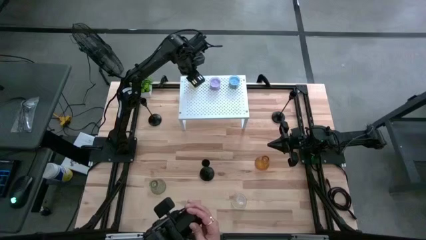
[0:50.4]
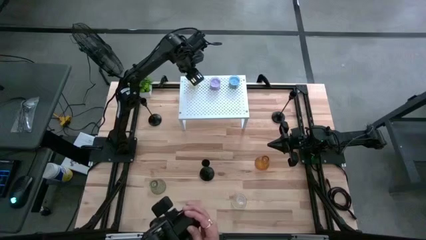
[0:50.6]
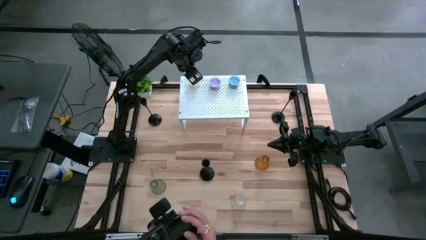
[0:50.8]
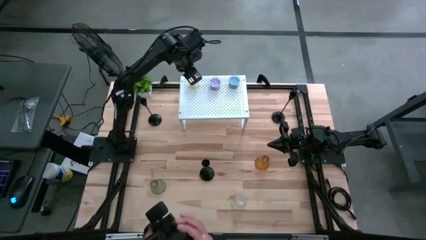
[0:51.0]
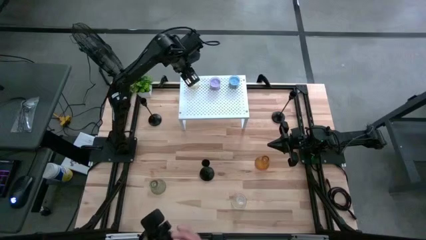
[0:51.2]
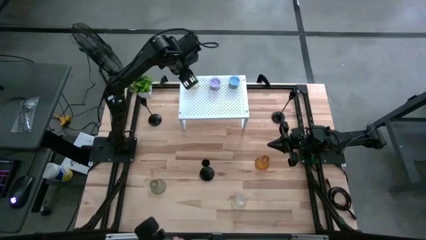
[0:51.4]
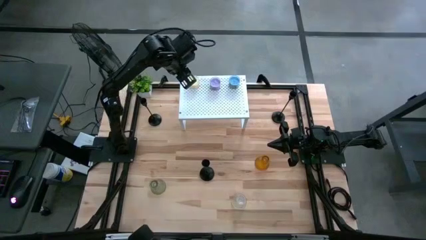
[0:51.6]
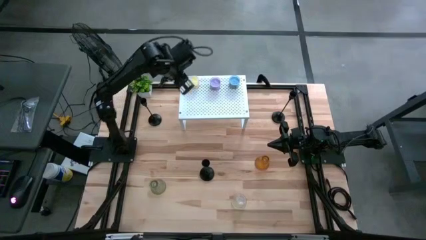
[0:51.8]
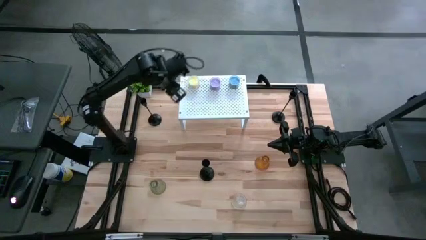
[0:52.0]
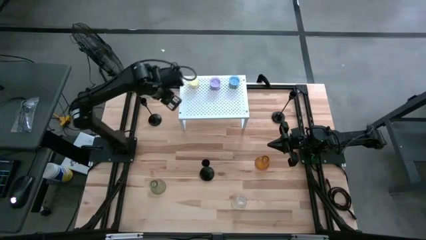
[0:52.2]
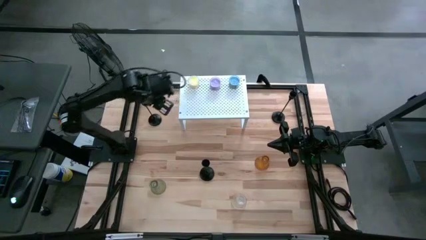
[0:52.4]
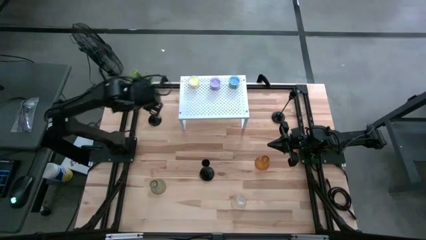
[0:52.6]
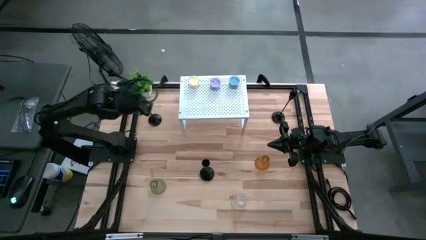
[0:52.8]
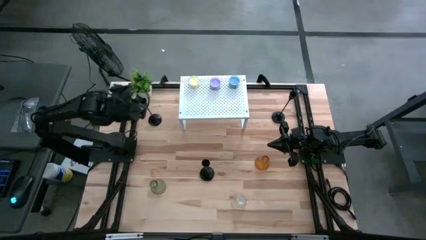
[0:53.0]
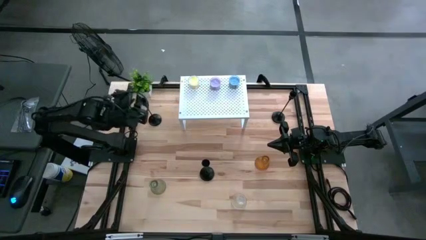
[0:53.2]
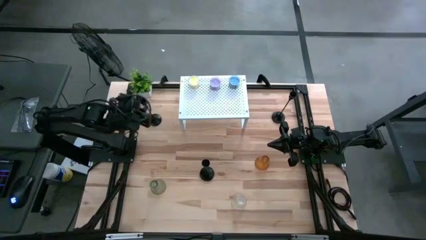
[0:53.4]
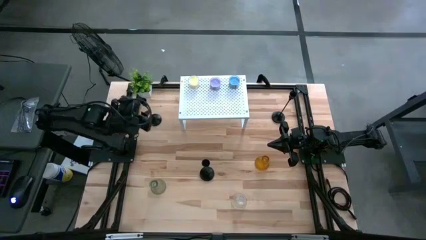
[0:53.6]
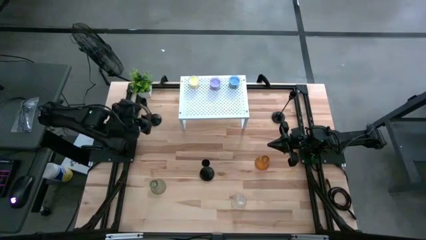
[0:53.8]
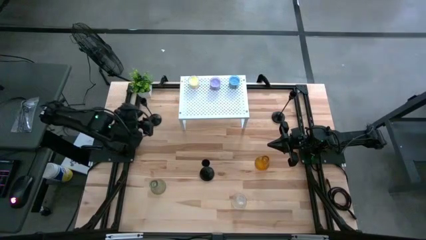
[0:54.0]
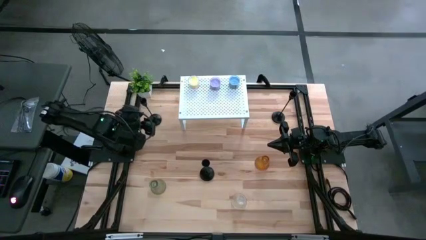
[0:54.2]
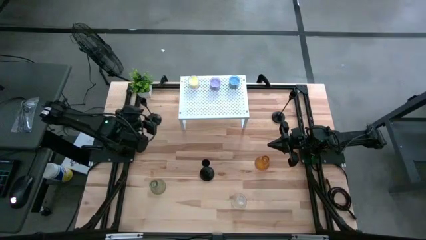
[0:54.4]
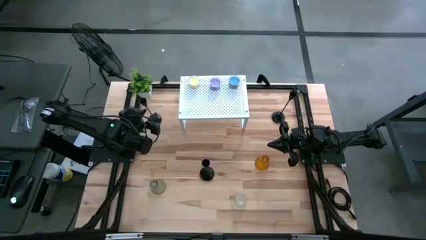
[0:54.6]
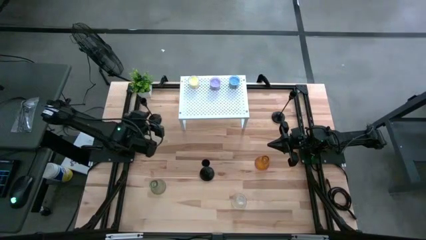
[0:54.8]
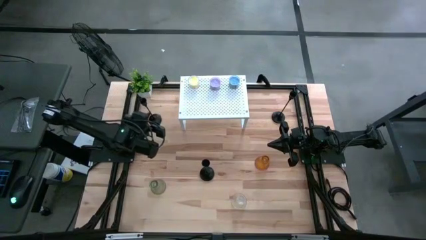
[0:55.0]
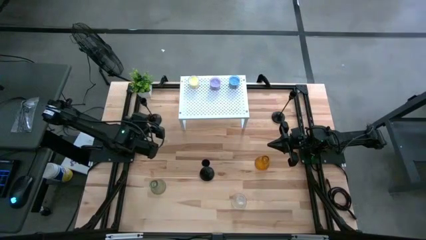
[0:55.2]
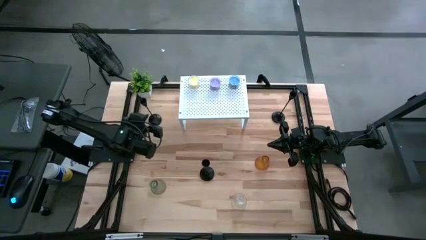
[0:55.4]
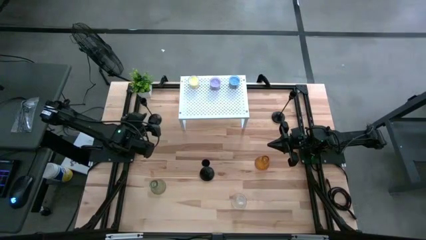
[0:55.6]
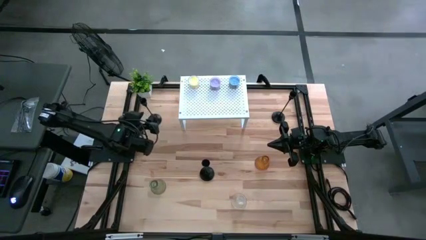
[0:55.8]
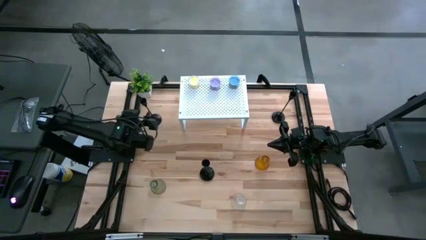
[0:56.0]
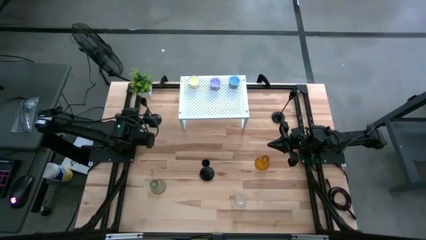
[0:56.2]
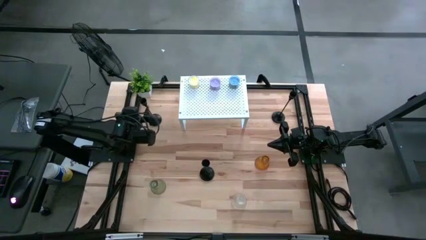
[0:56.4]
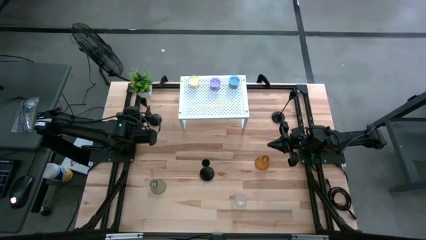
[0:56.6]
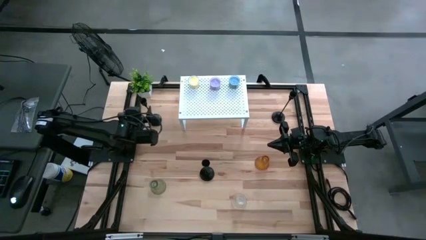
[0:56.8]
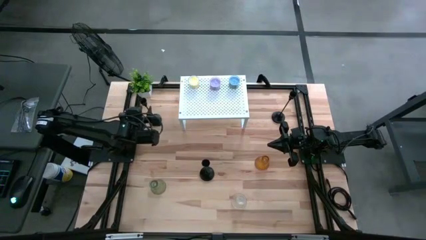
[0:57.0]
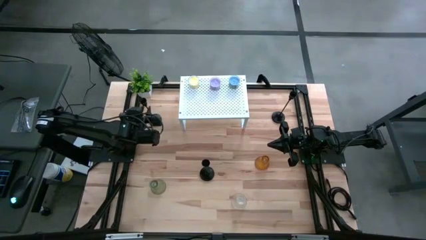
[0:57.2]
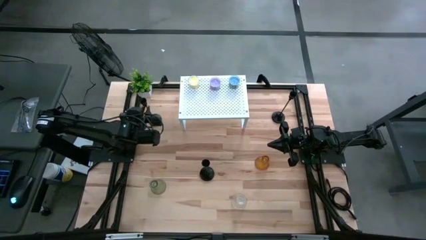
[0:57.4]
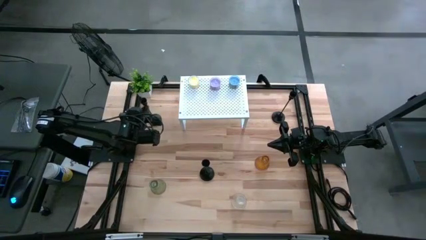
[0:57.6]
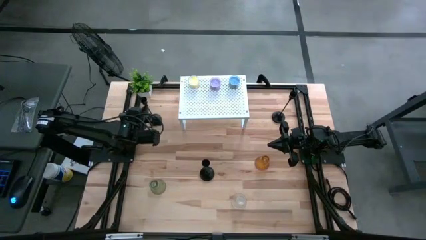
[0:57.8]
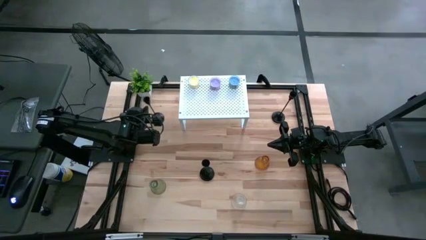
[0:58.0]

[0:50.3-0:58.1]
Task: Pick & Place candle stick holders
Put the top left black candle holder on the shelf

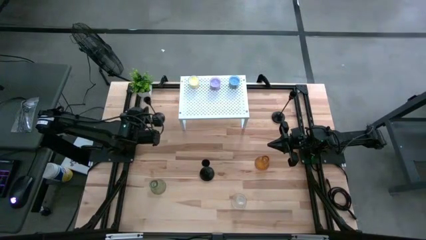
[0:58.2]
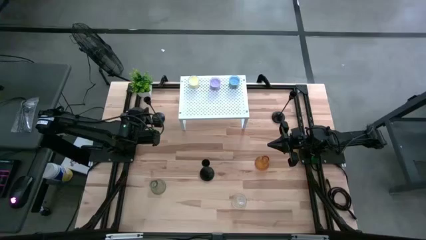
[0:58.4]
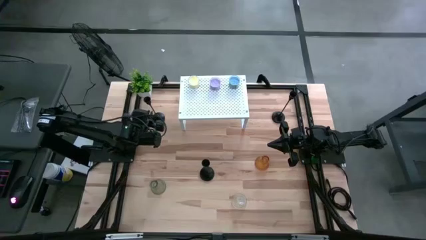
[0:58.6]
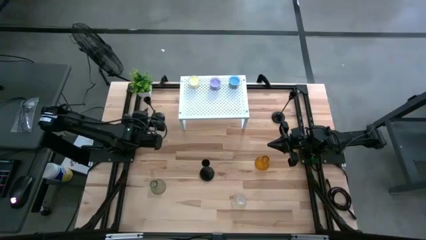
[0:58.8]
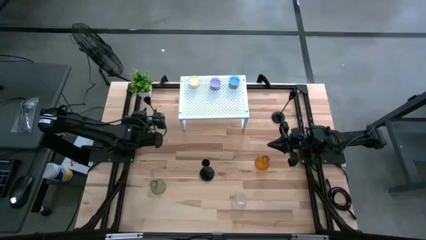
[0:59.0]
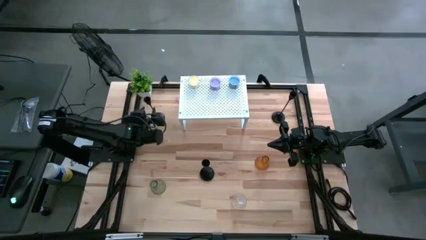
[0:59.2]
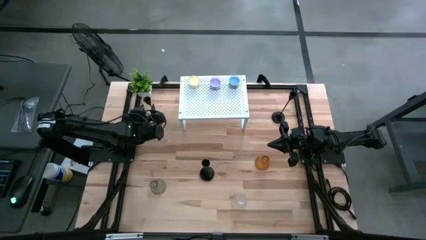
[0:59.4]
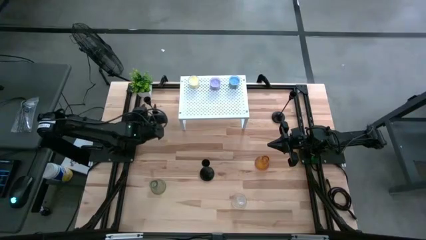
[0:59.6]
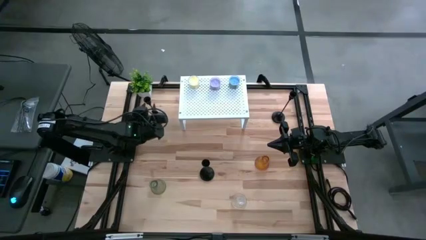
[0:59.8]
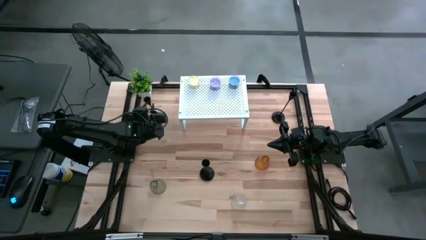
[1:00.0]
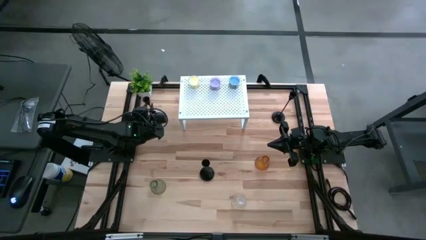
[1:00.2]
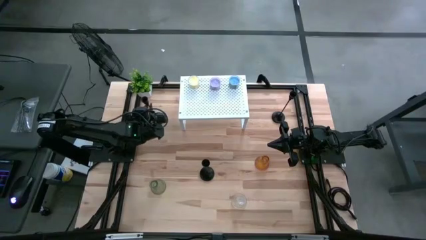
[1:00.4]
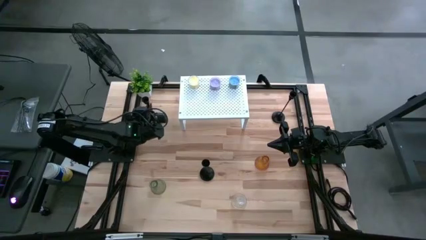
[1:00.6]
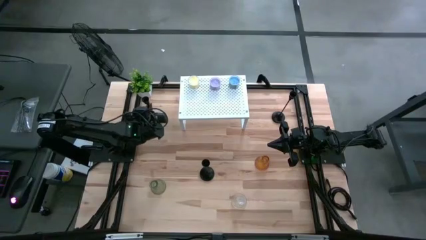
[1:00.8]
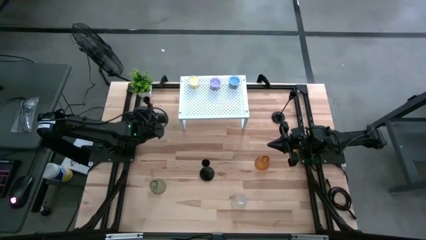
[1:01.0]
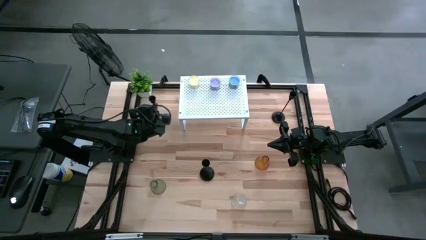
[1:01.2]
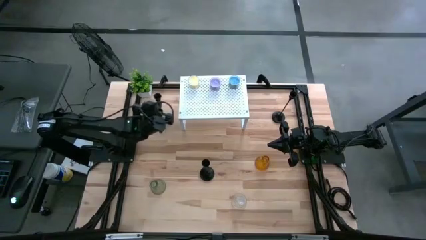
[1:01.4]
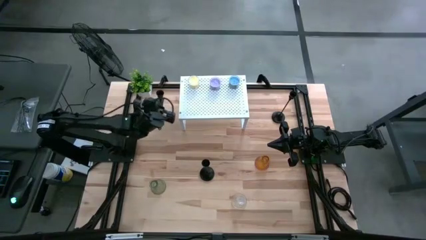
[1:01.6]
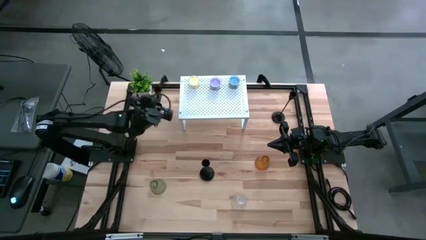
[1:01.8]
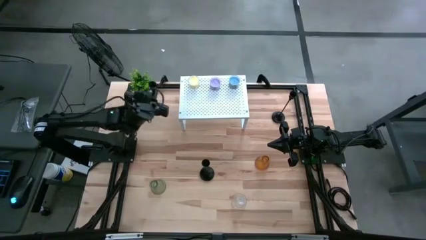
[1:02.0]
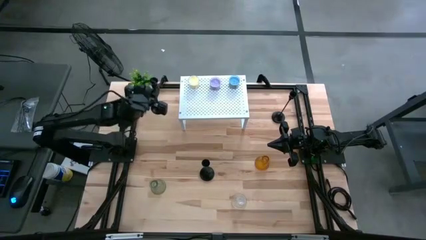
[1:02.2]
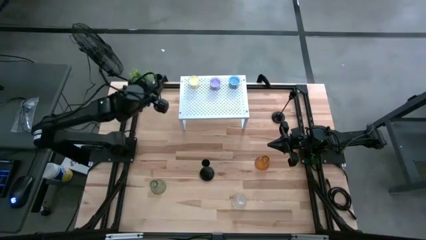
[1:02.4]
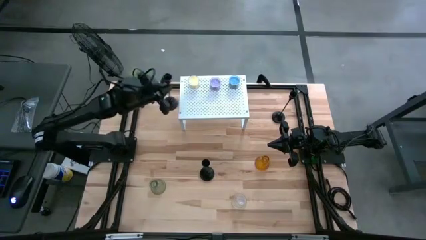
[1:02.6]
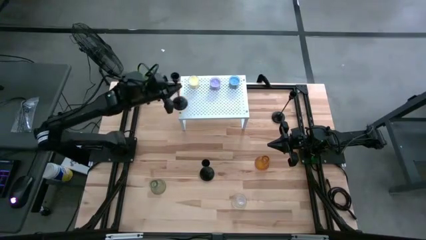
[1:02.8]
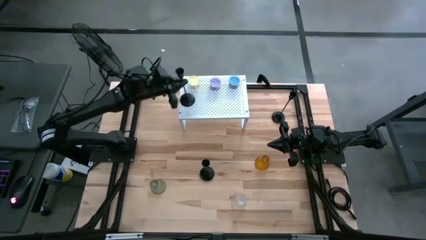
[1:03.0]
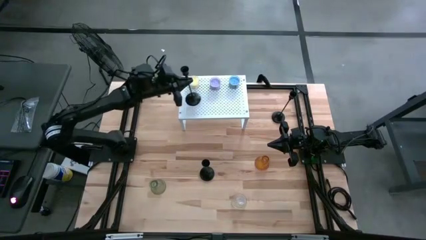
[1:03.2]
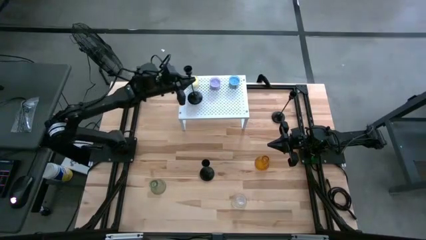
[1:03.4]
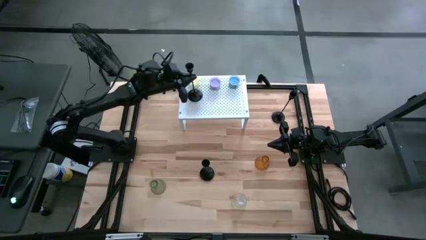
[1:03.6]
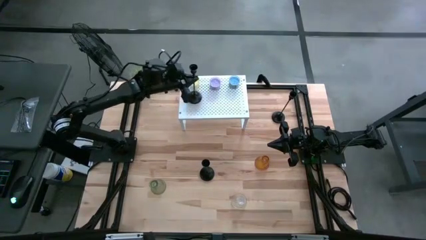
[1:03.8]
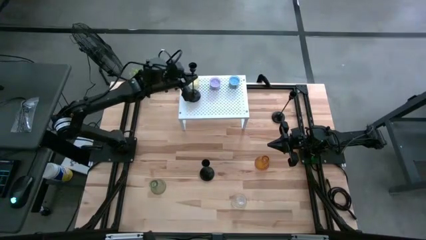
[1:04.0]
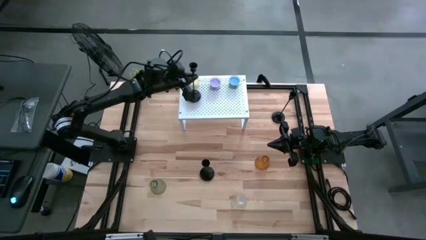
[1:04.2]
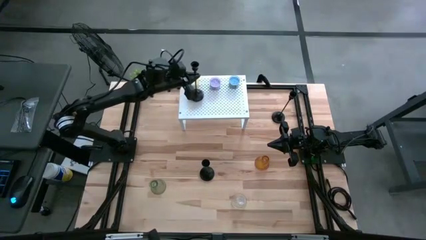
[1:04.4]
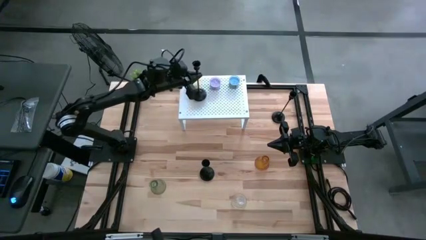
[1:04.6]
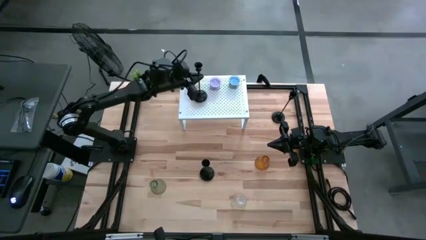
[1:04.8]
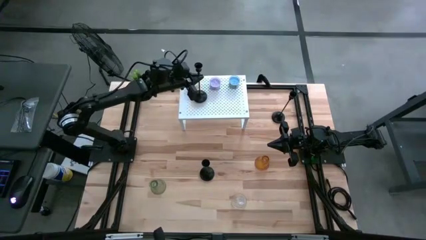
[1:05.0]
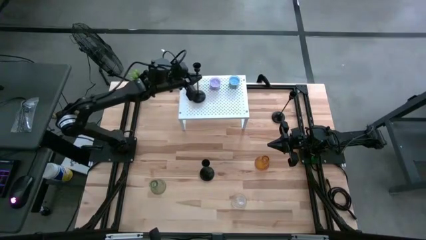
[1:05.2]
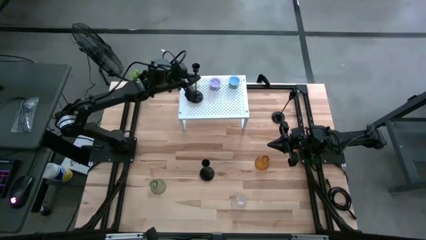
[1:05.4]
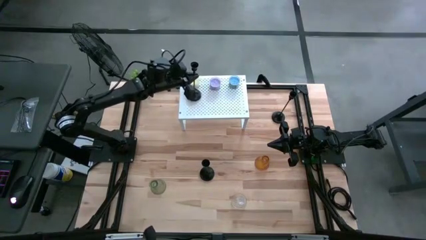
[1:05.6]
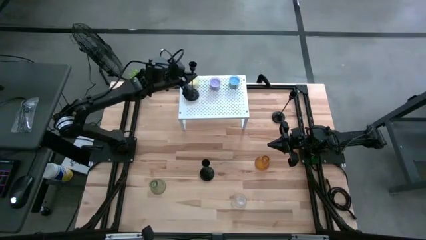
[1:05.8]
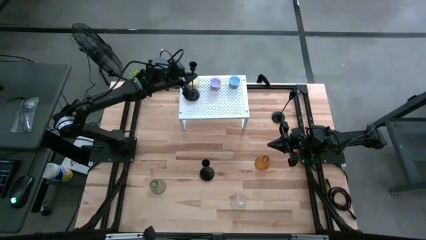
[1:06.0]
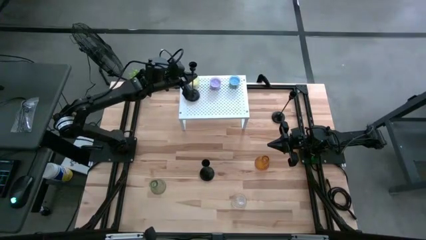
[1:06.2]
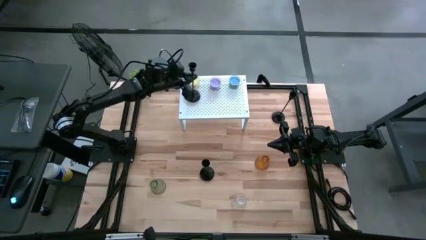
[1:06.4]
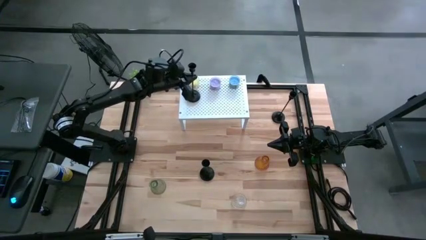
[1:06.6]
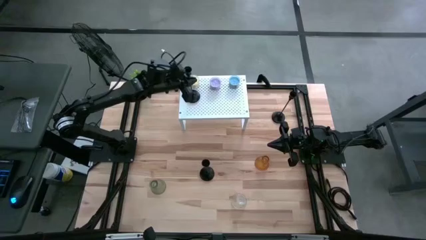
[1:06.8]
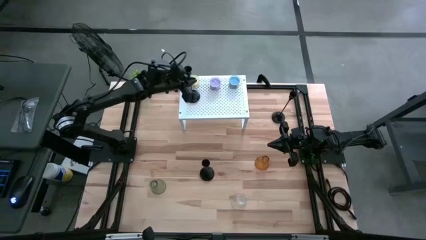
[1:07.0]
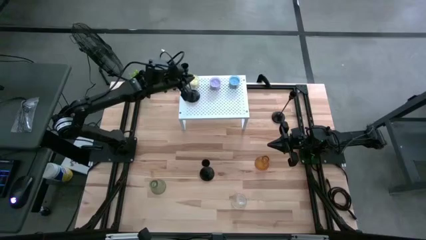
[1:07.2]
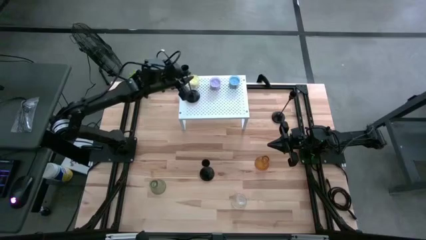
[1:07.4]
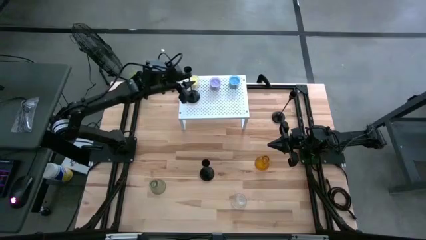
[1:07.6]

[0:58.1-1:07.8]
Put the top left black candle holder on the shelf
